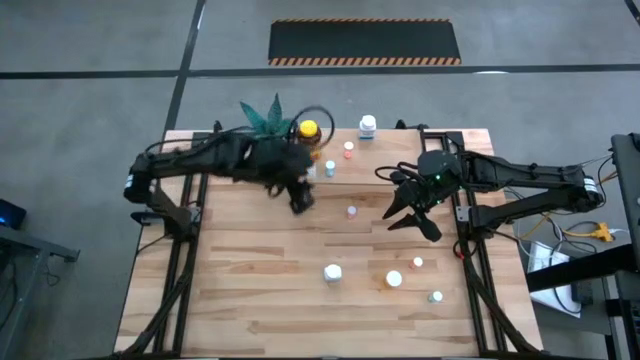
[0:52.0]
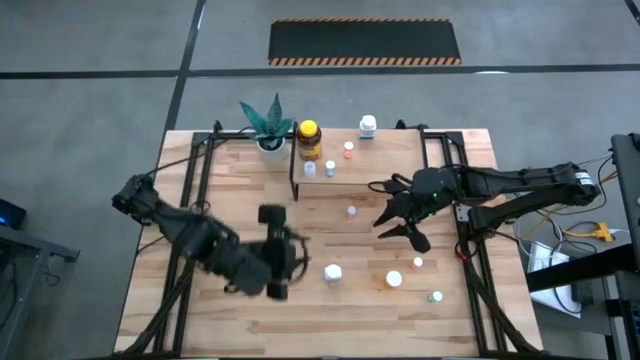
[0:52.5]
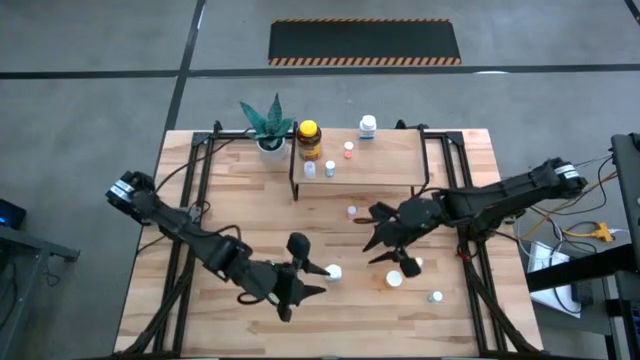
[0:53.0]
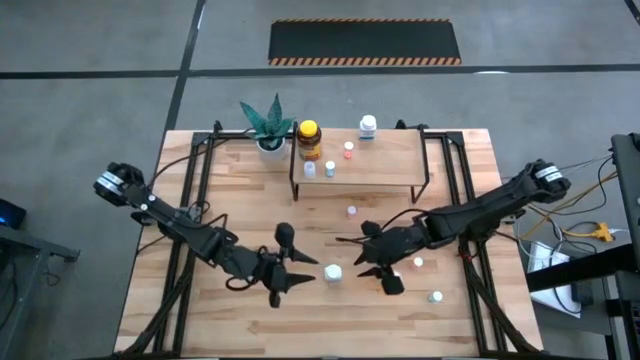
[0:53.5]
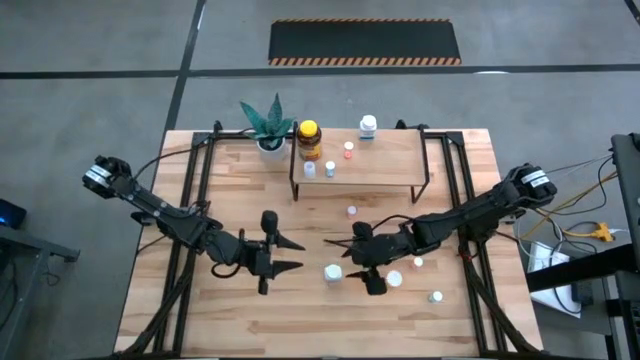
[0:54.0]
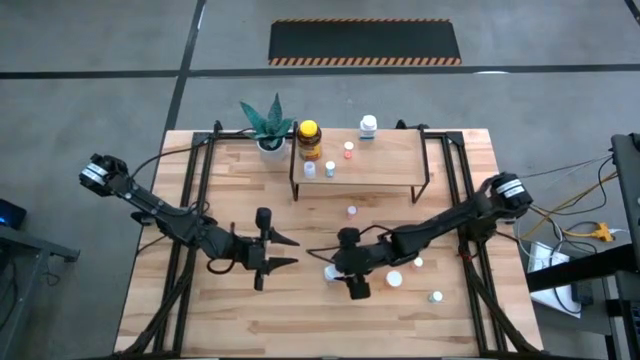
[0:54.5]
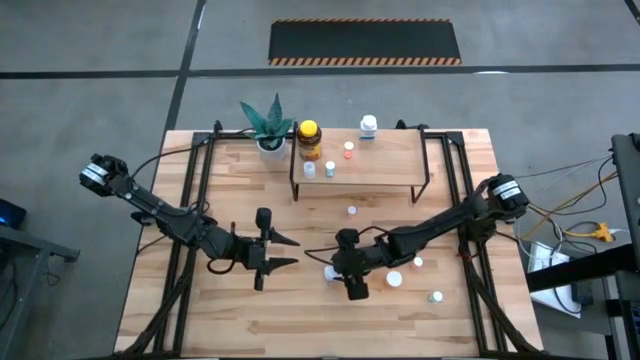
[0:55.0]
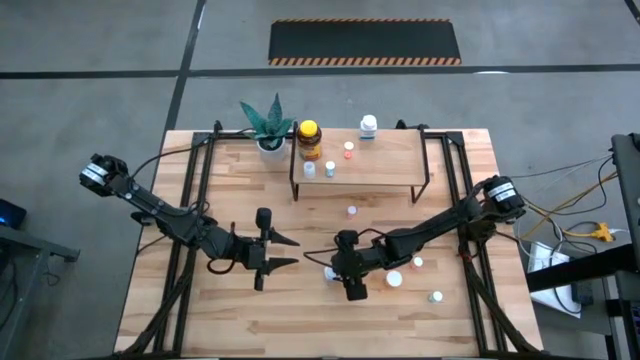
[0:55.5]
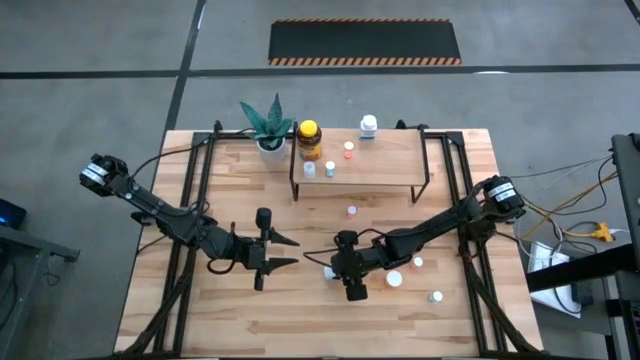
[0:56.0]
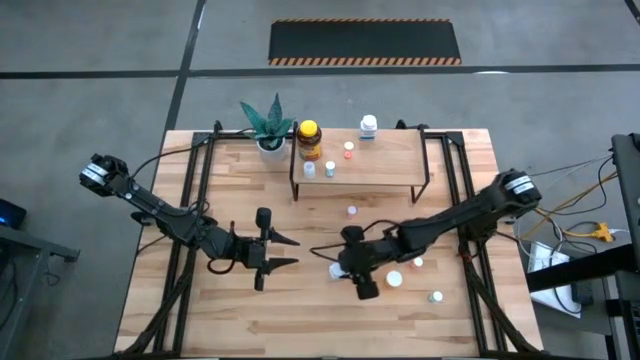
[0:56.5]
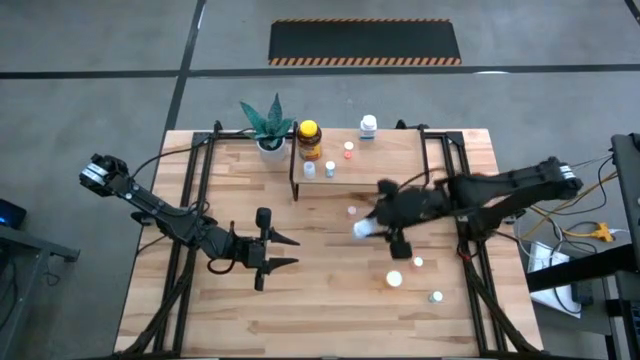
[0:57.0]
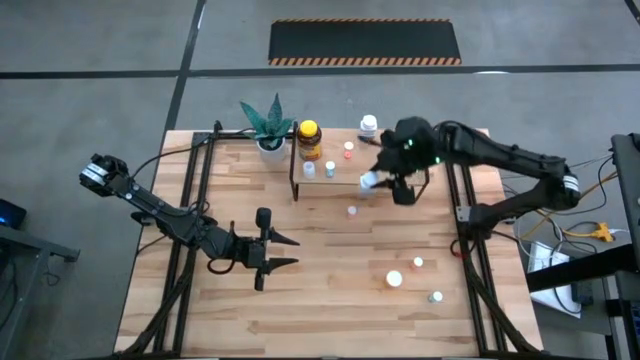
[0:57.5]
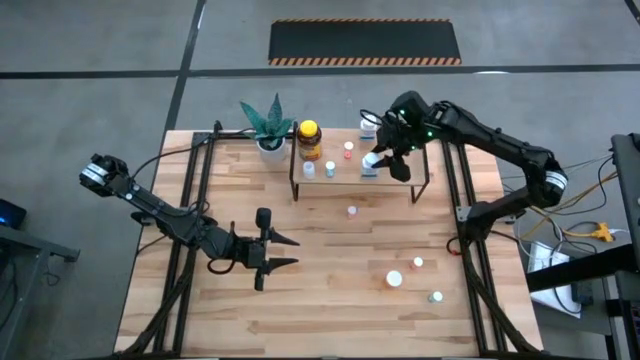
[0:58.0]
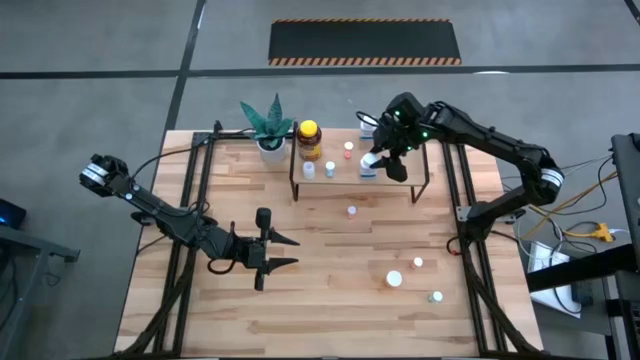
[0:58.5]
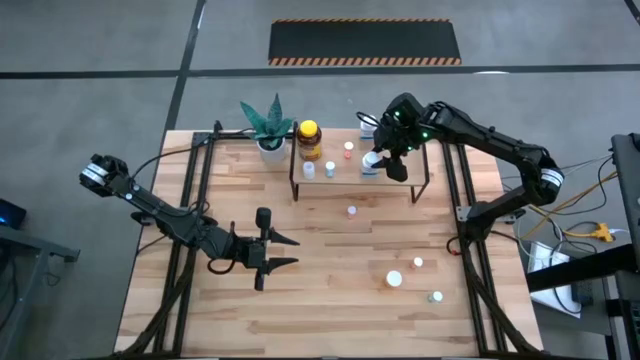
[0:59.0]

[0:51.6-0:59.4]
Task: Pick and place medicine bottles onto shelf by color
Put the blue and white medicine bottle on the shelf

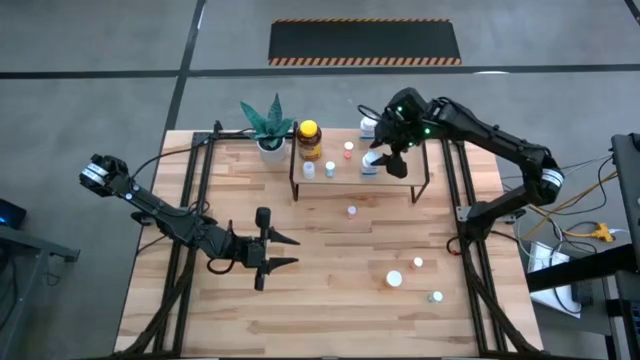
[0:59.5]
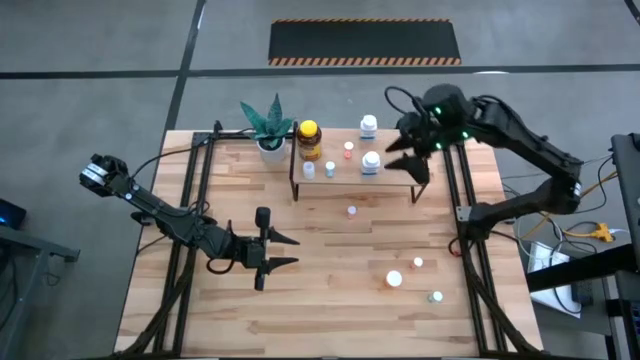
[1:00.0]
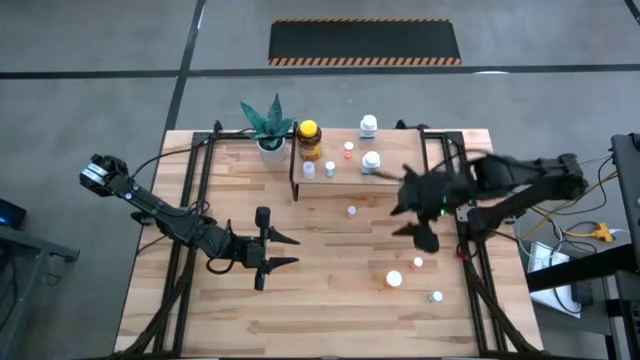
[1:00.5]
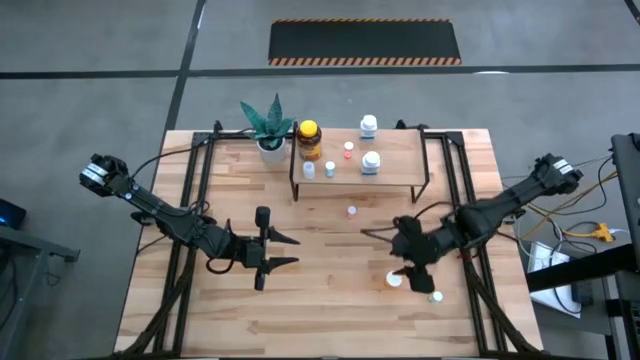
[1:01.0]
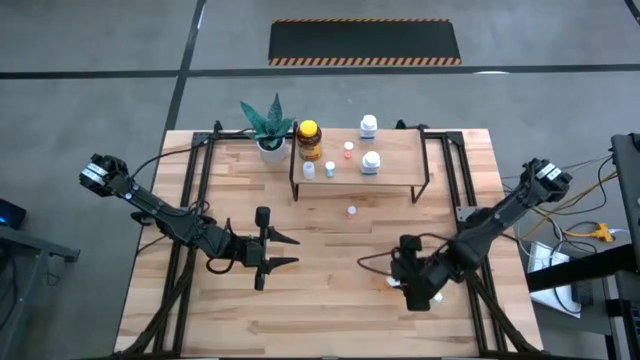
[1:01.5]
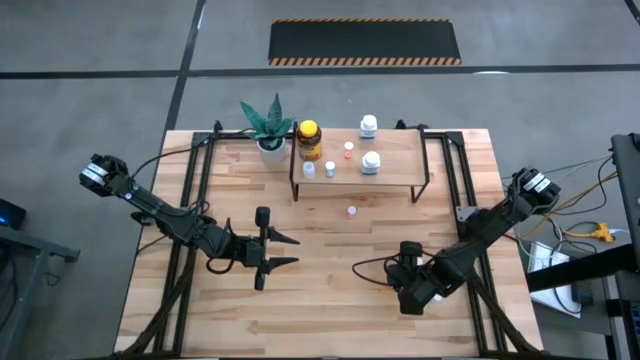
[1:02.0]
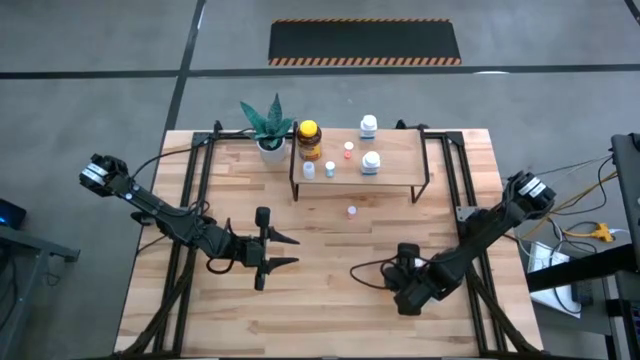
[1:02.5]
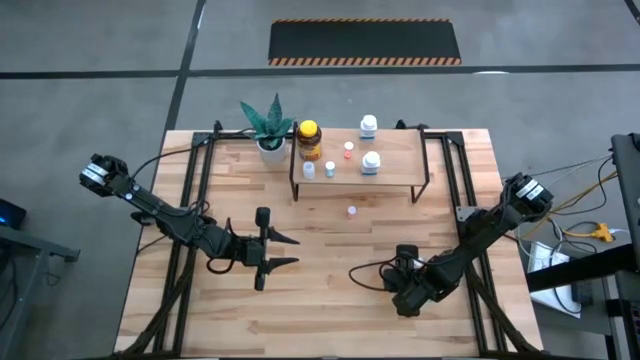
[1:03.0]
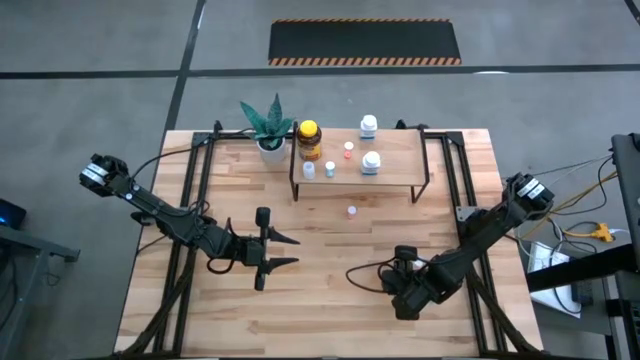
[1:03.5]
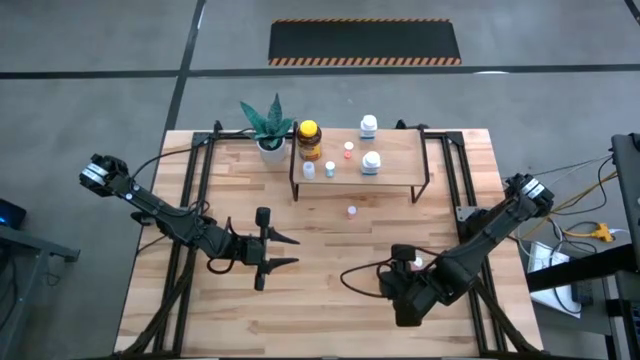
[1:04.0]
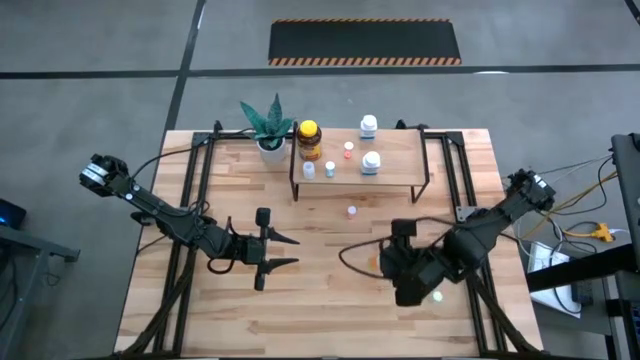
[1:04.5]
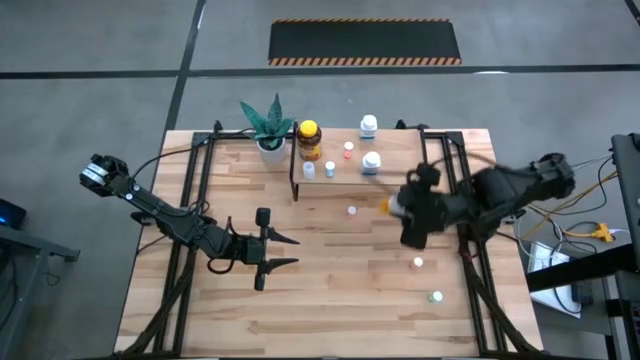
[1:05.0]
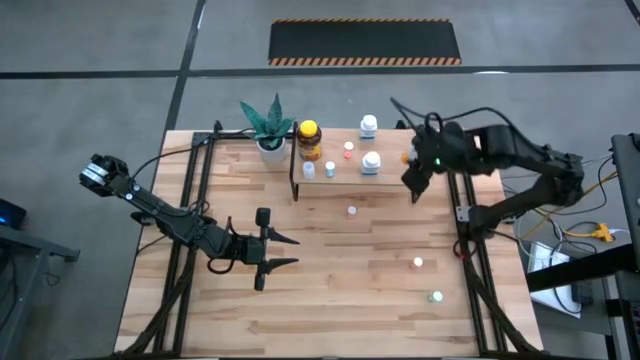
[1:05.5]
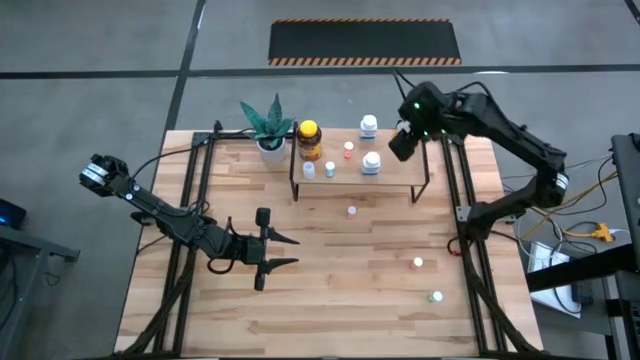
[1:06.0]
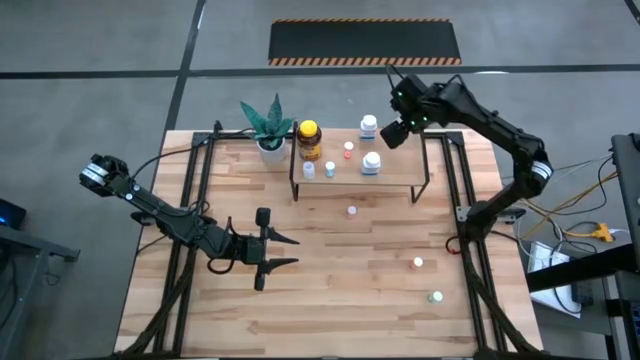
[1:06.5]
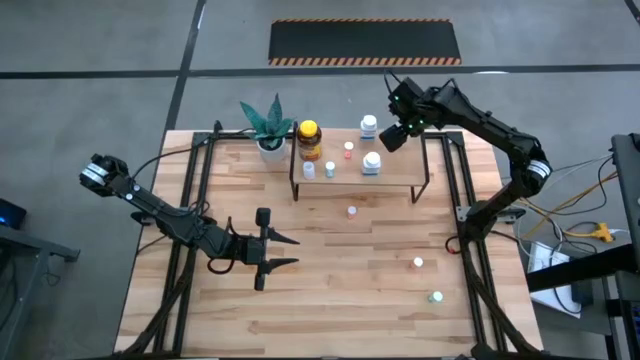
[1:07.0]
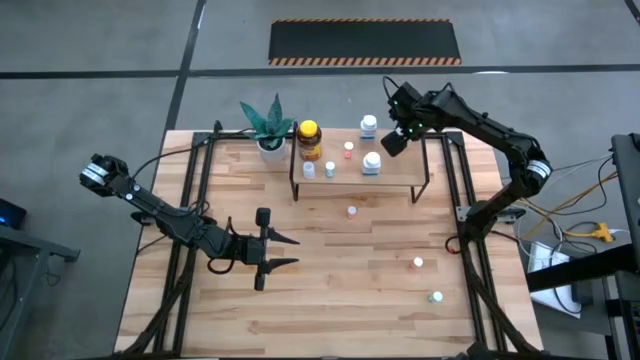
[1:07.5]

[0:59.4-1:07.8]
Put the orange medicine bottle on the shelf

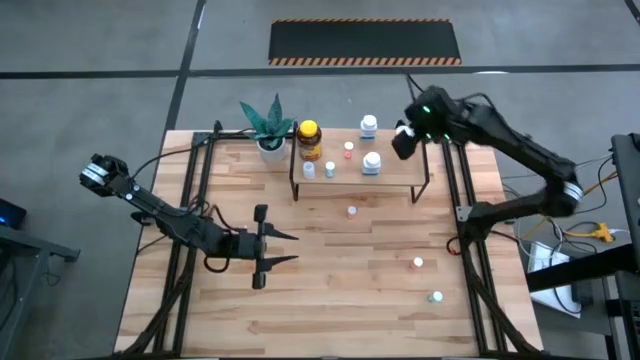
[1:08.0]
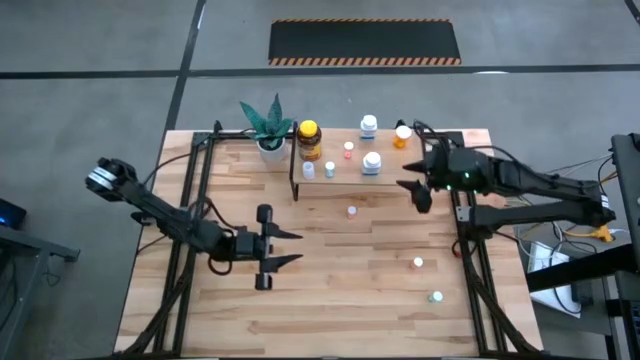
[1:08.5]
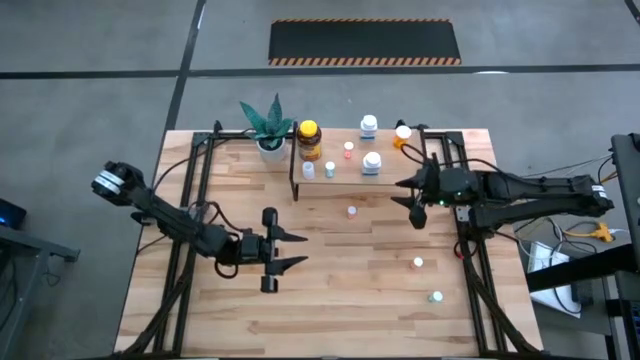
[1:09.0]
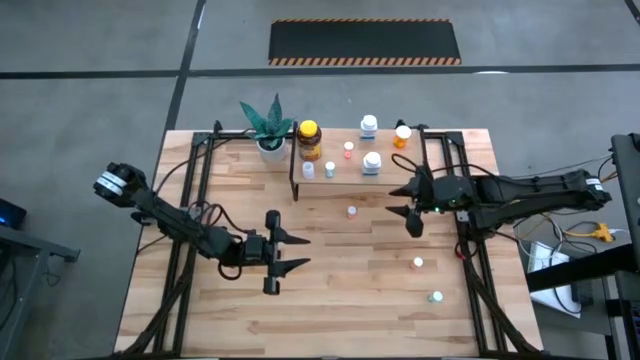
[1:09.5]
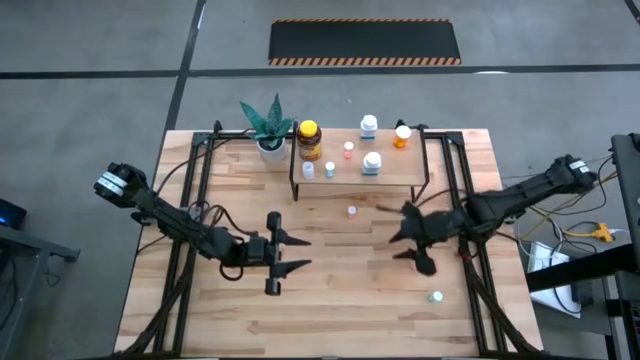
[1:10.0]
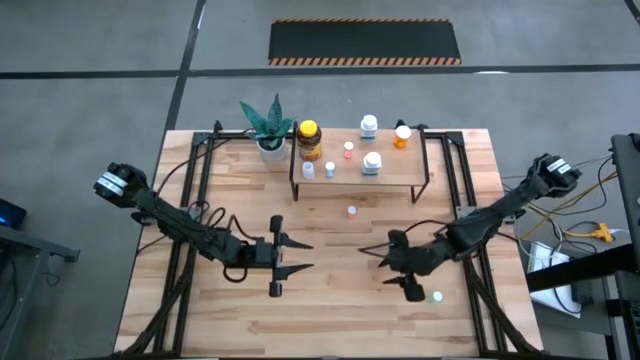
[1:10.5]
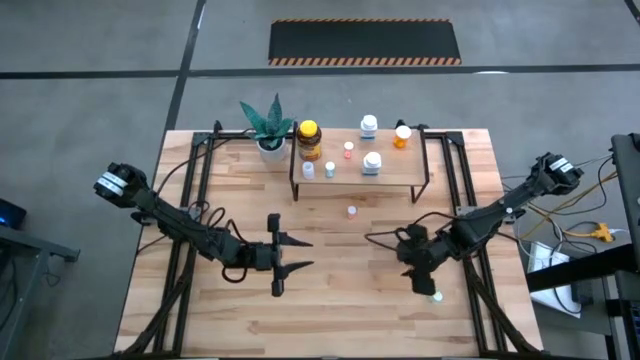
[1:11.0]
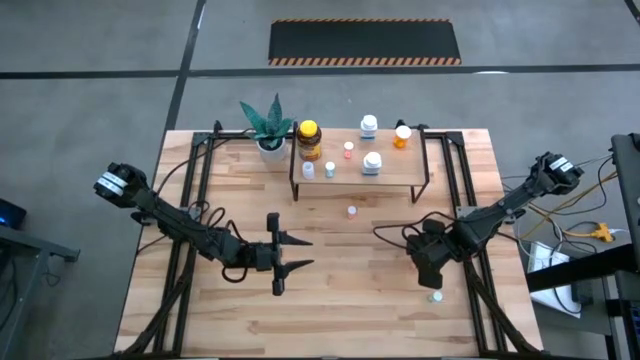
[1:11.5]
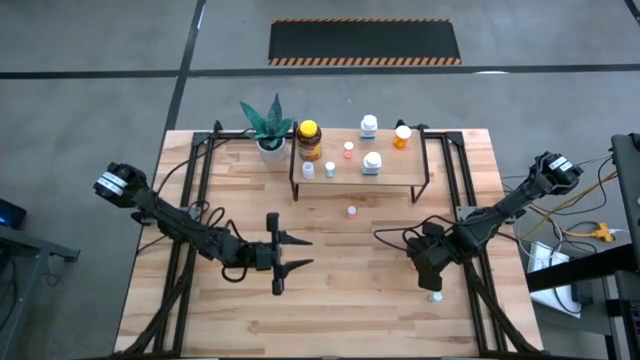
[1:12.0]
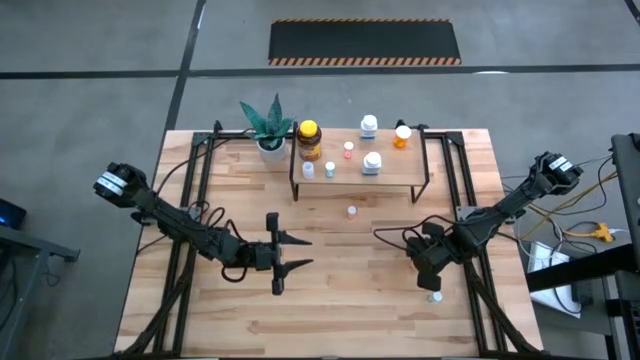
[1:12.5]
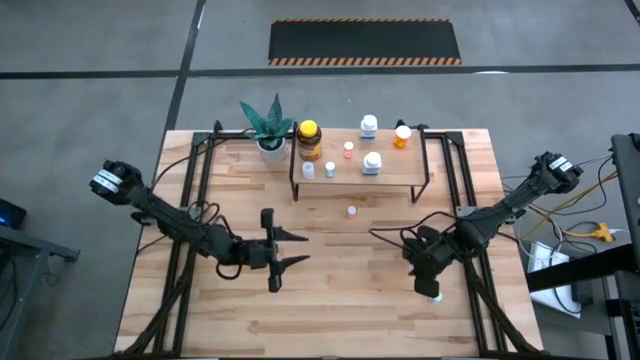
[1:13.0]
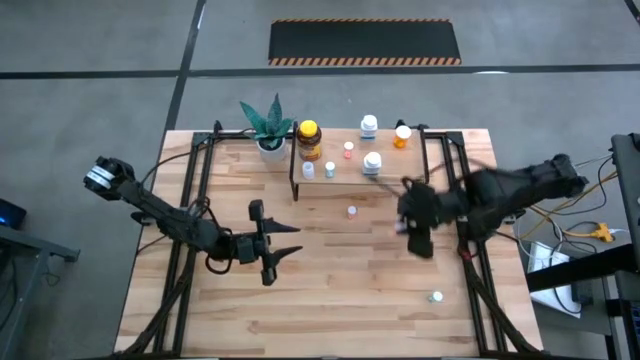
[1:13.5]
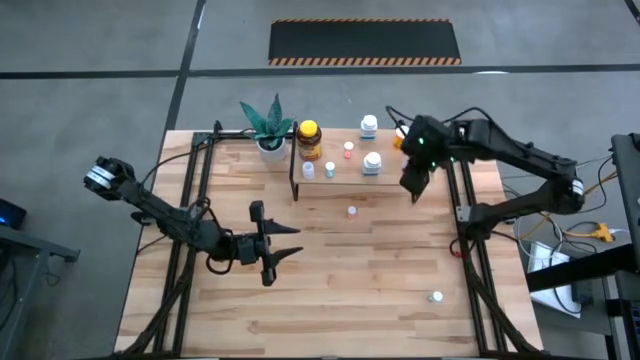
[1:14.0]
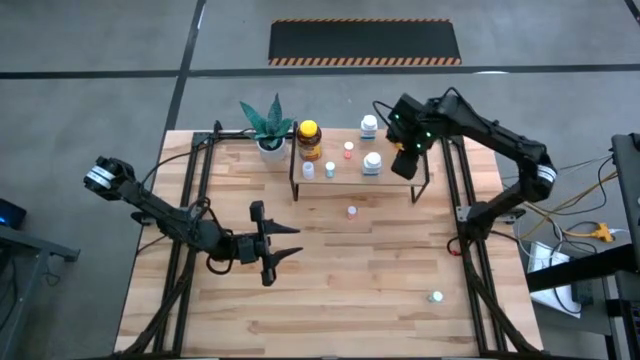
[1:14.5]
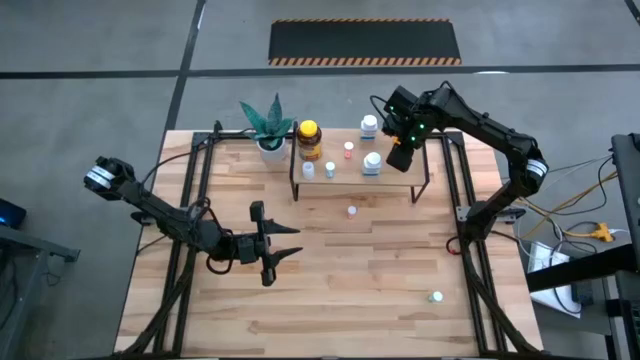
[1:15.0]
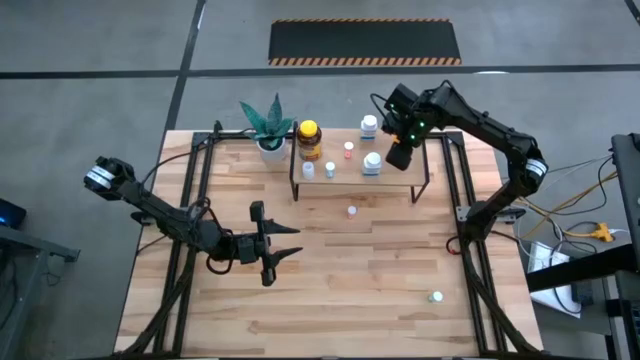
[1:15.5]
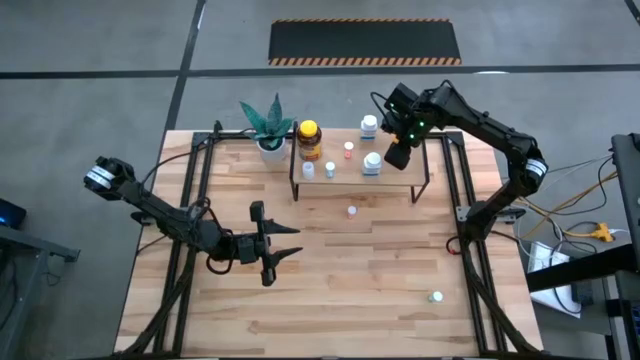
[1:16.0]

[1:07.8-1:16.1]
Put the bottom pink medicine bottle on the shelf
